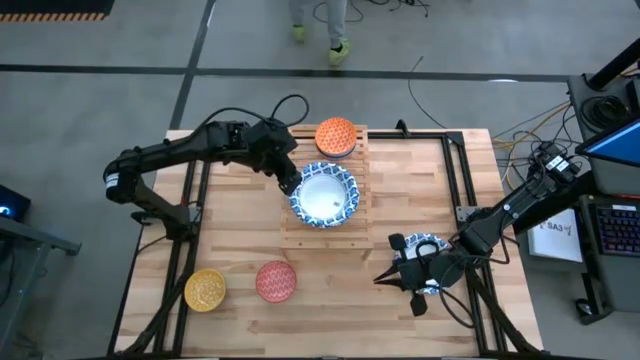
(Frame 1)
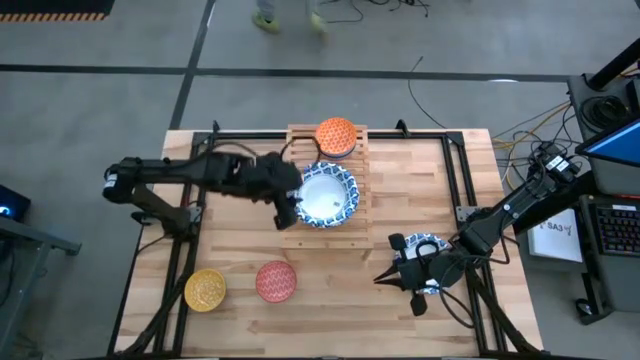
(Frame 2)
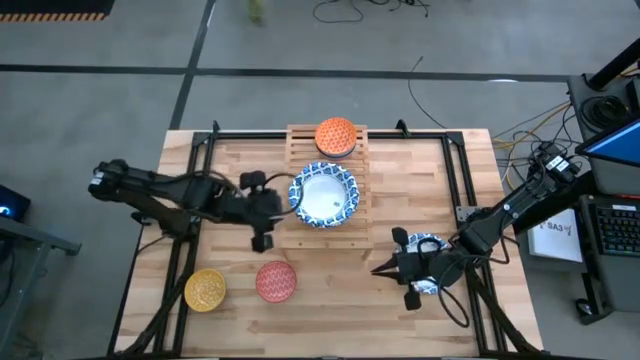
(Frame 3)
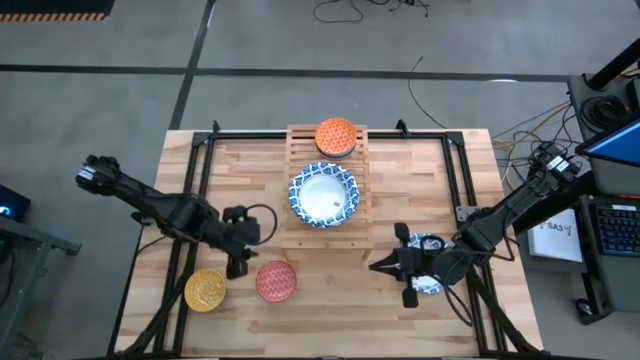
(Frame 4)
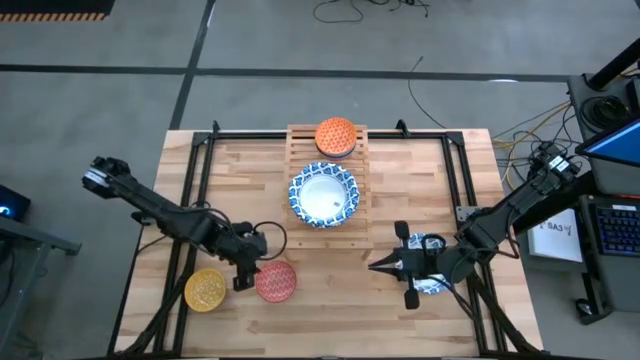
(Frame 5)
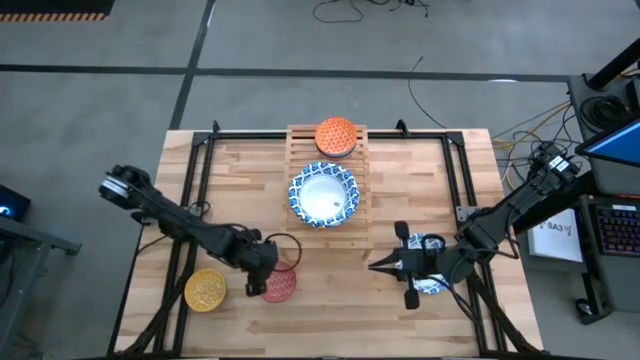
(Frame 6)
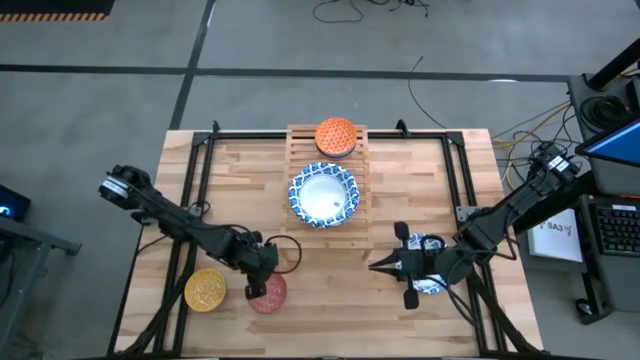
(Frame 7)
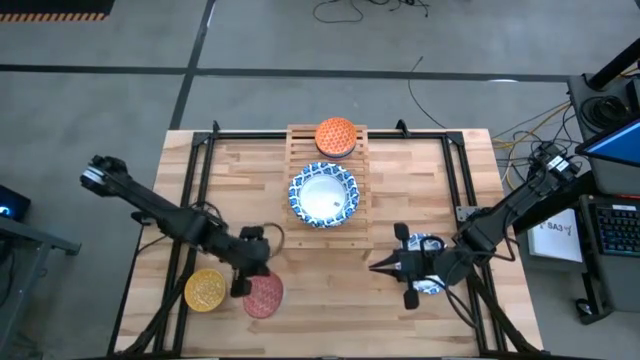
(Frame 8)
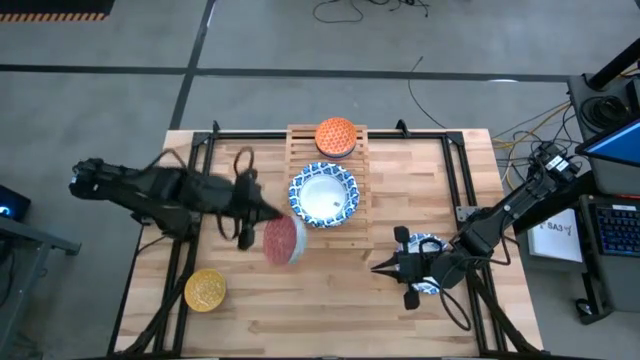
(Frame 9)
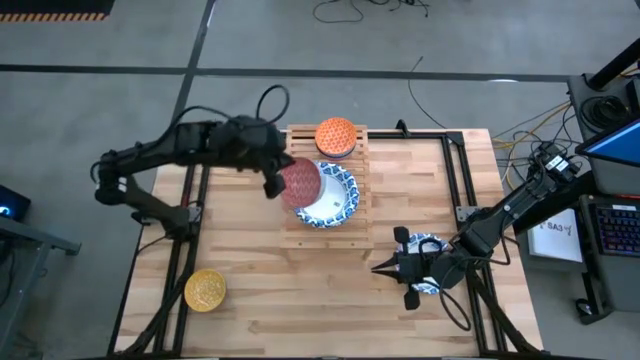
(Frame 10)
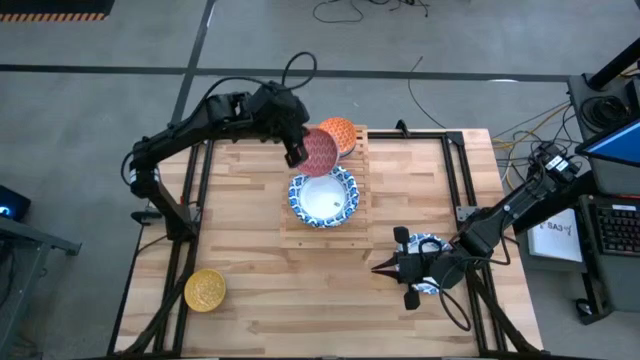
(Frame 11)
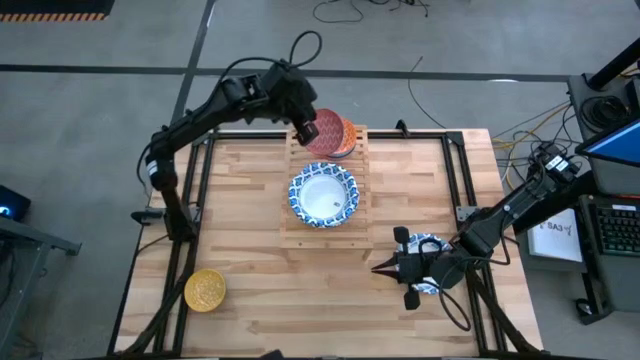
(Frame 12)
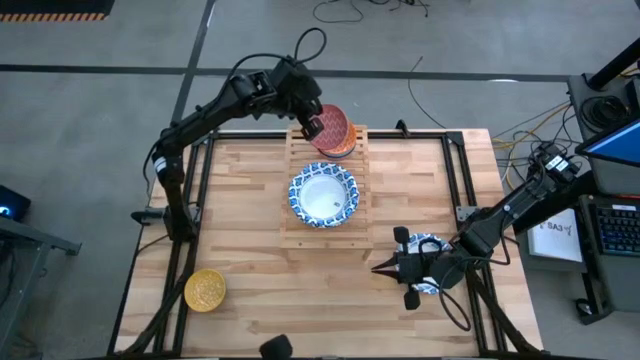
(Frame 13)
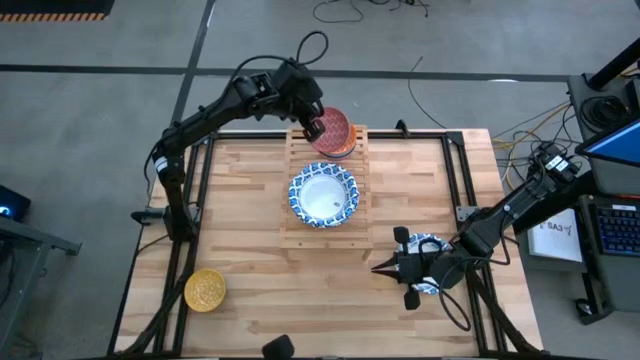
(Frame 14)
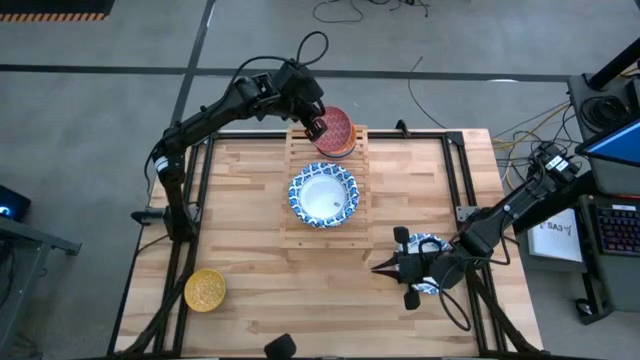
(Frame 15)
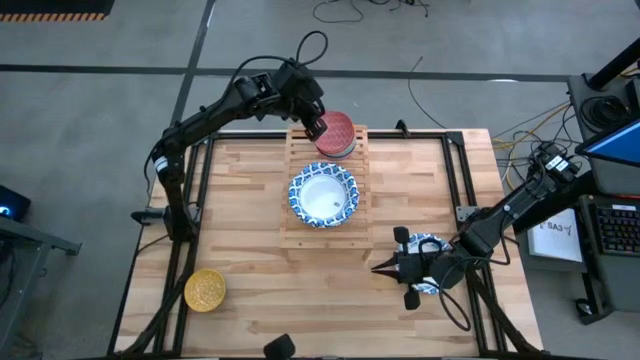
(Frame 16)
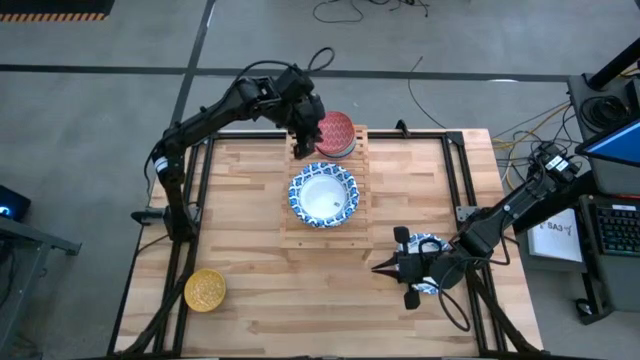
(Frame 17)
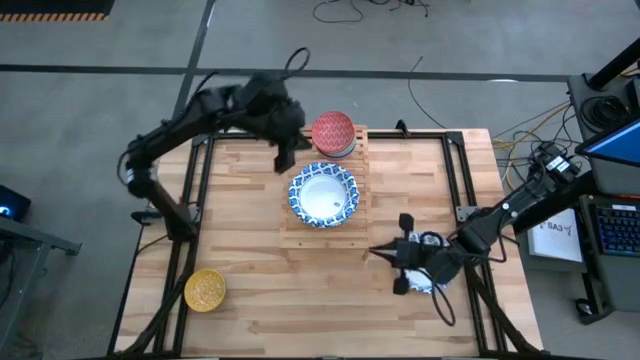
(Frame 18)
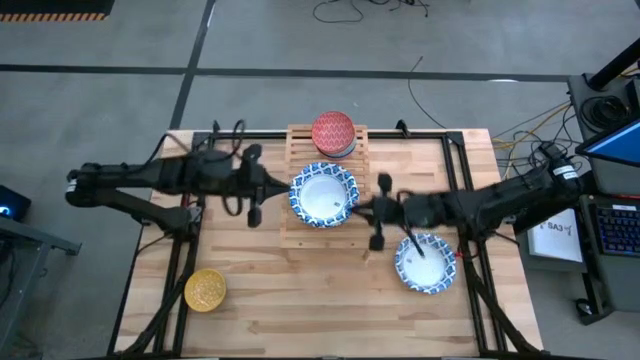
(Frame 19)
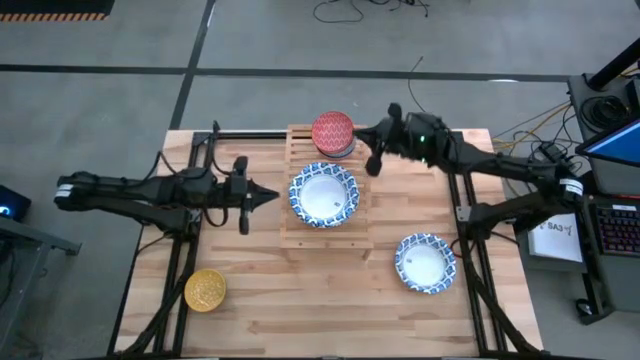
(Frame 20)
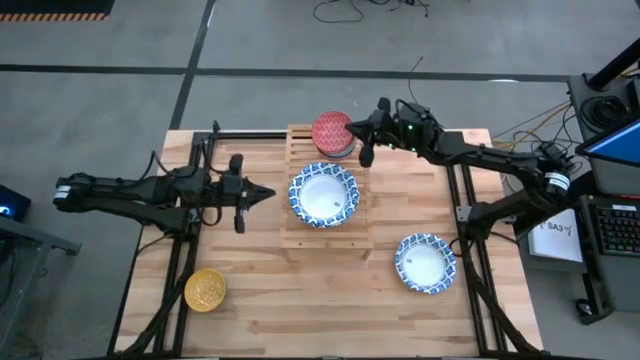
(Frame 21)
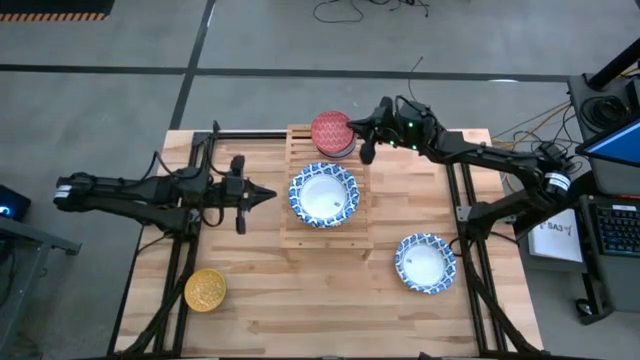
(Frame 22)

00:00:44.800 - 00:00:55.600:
Task: Place and stack bowls onto a shelf
Stack the red bowl on top of the orange bowl on the shelf

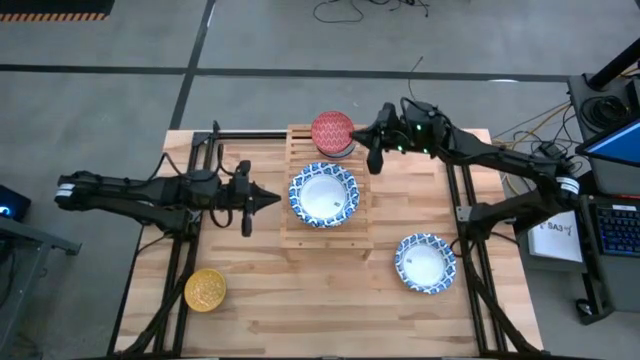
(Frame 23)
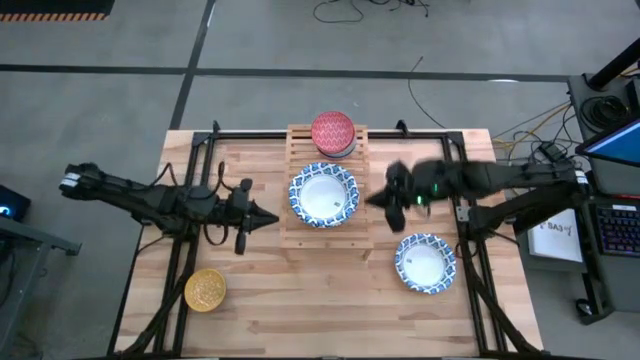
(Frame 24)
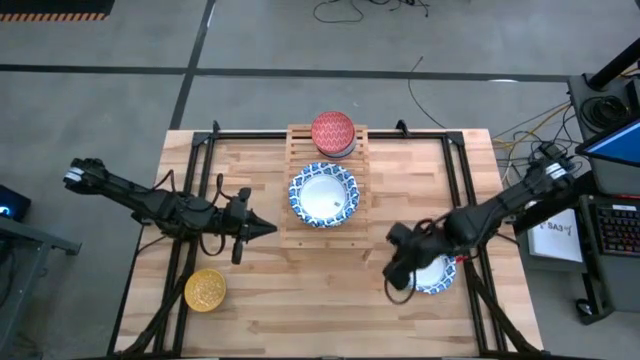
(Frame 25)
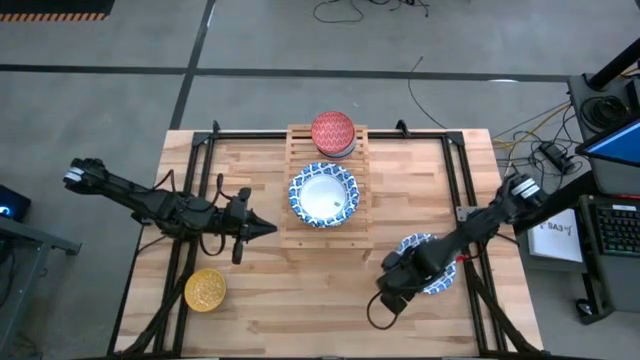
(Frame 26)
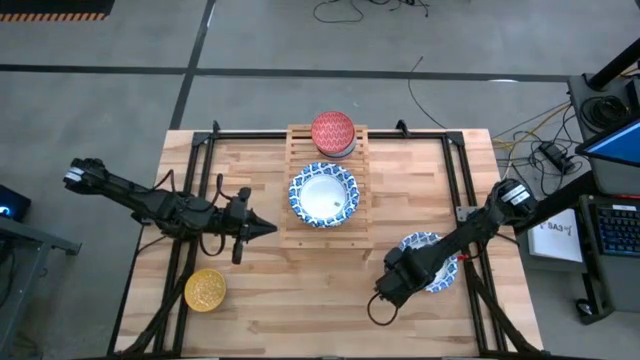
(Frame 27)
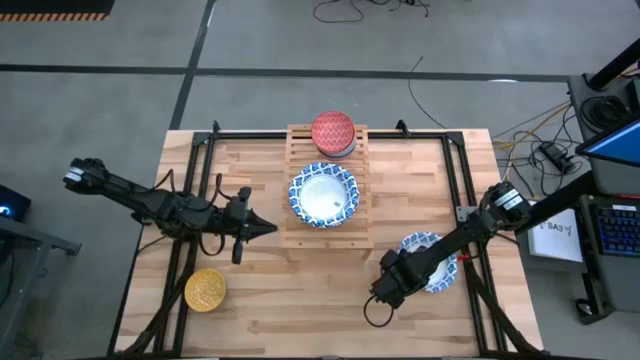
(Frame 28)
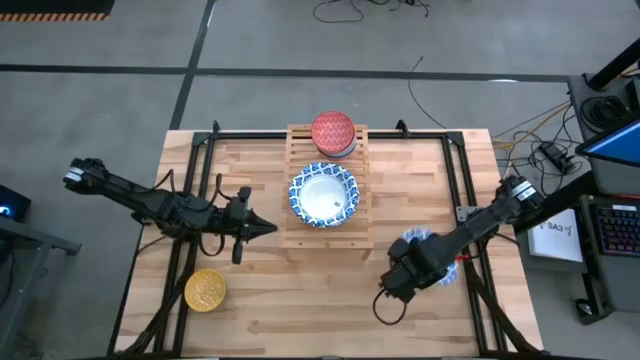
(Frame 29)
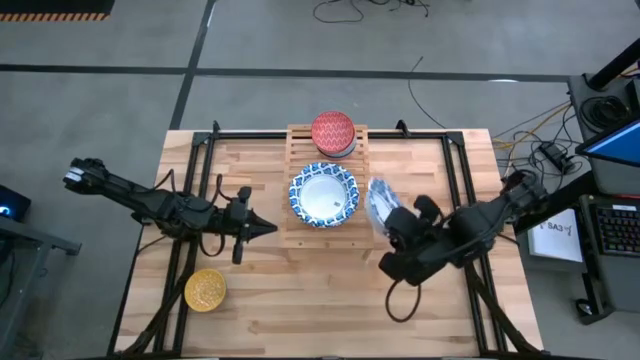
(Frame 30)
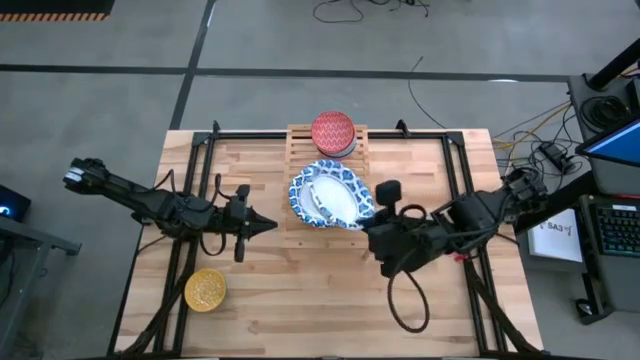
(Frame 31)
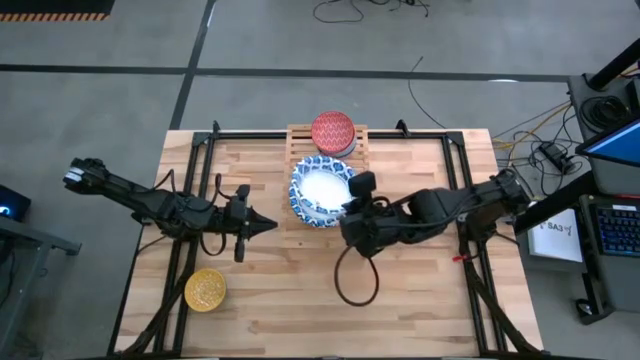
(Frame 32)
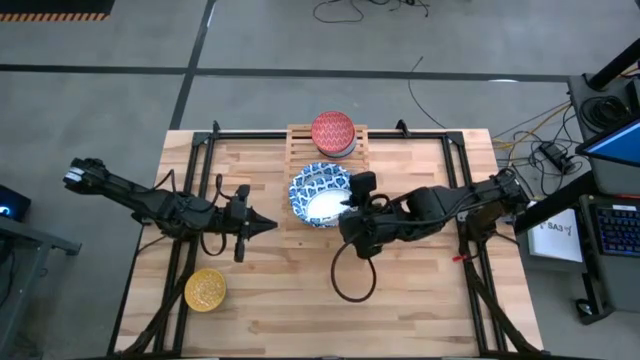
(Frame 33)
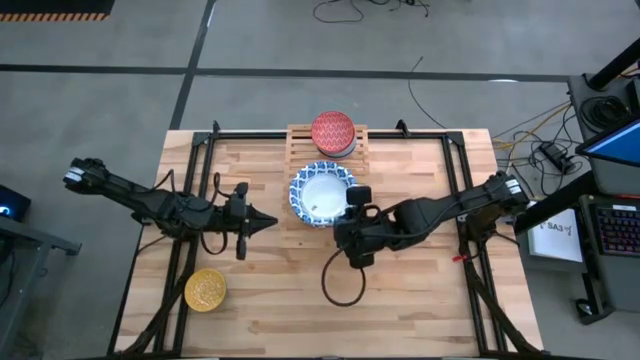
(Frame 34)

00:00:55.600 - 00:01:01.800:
Stack the white patterned bowl on top of the white patterned bowls on the shelf

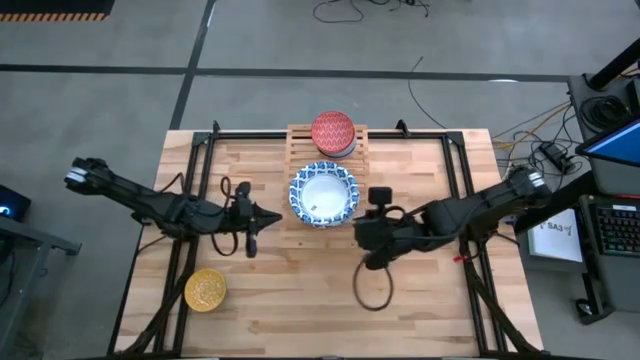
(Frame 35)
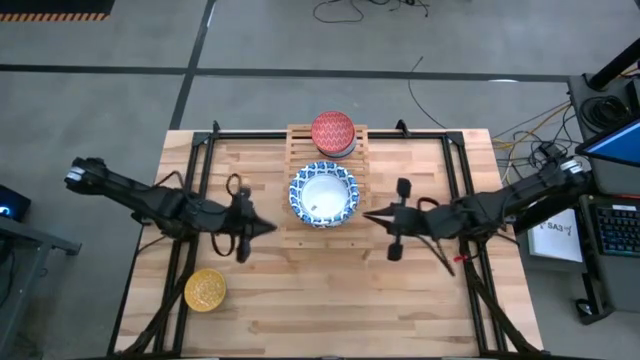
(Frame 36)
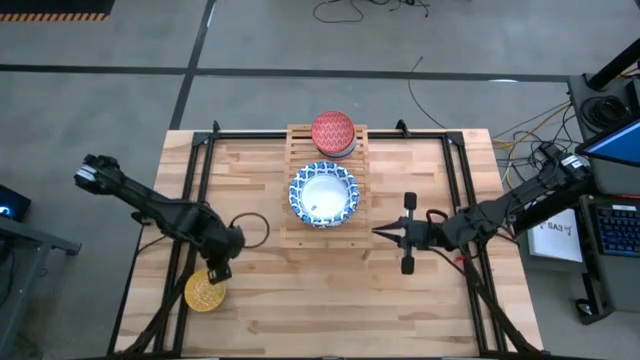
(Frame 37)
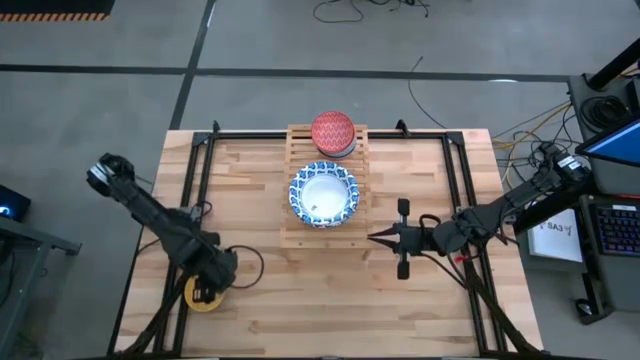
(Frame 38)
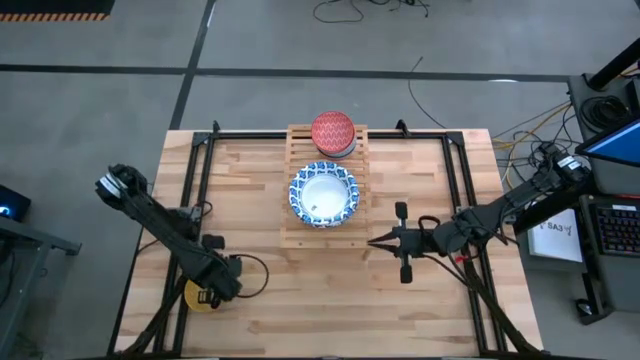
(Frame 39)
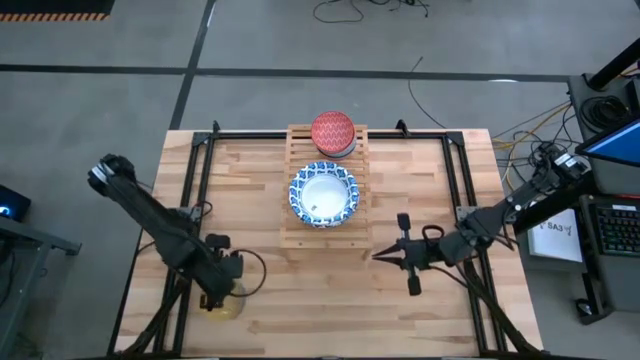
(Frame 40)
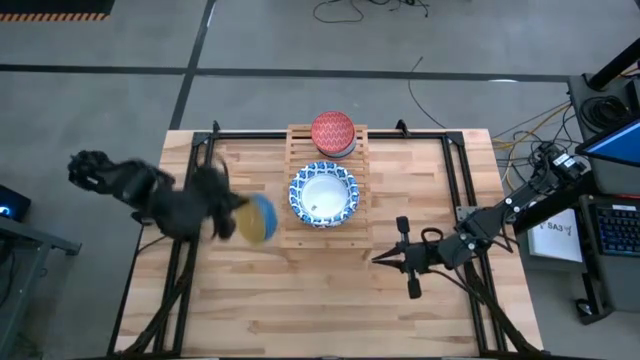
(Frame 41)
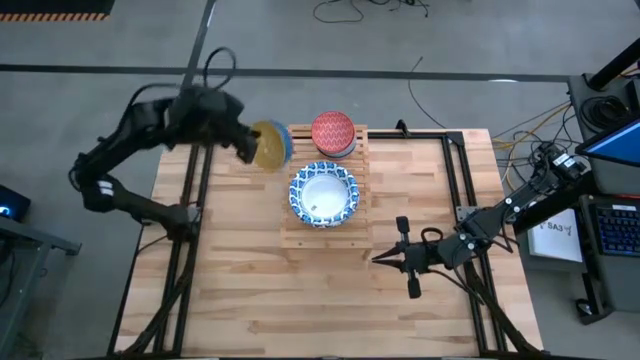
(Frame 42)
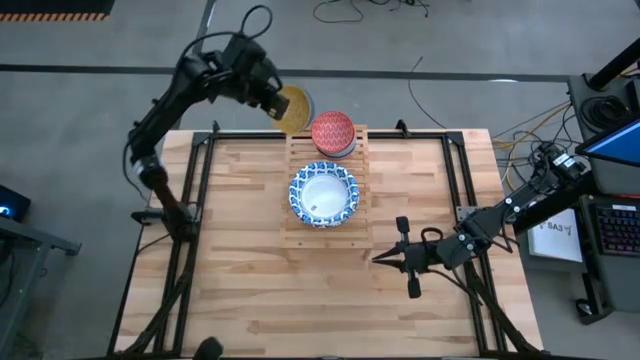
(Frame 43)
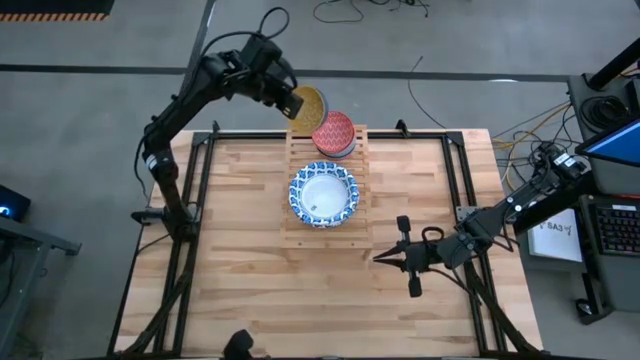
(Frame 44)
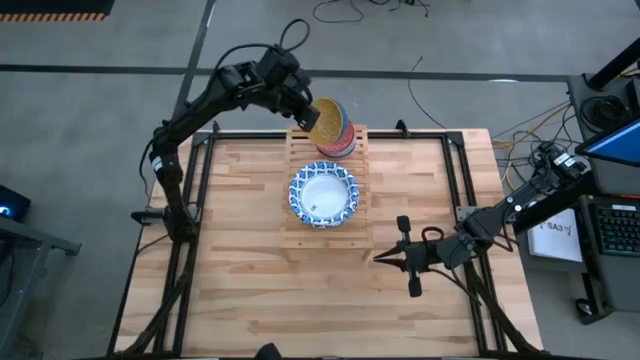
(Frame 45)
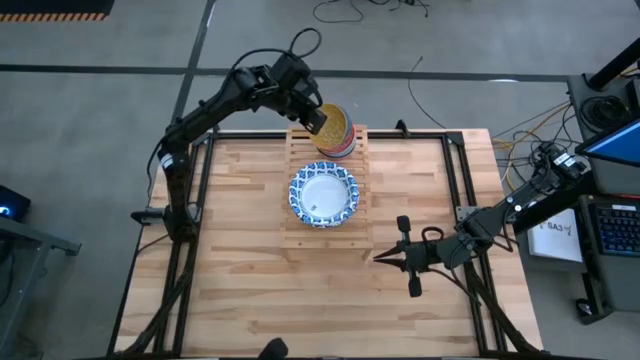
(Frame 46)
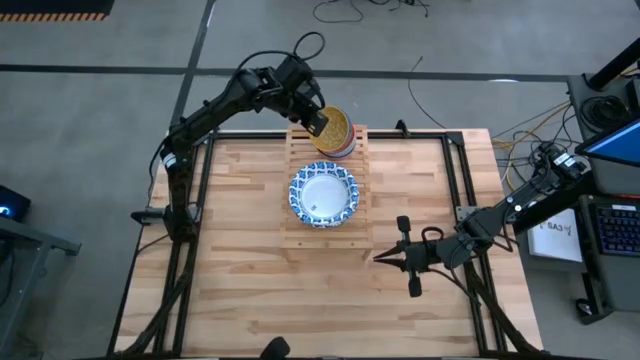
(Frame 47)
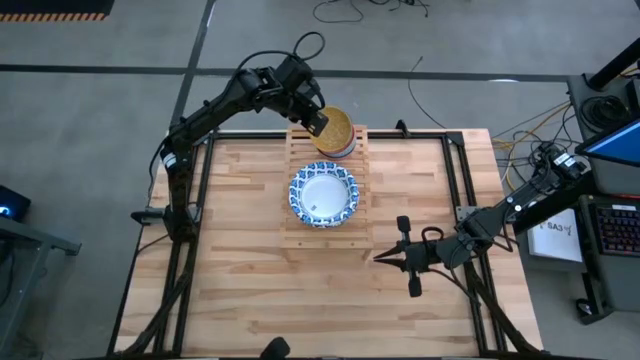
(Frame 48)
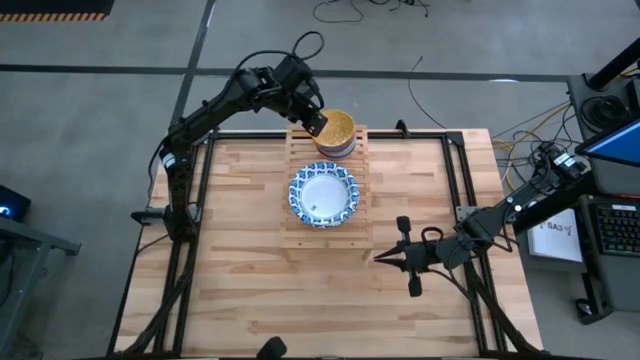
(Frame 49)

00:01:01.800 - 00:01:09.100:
Stack the yellow bowl on top of the red bowl on the shelf
